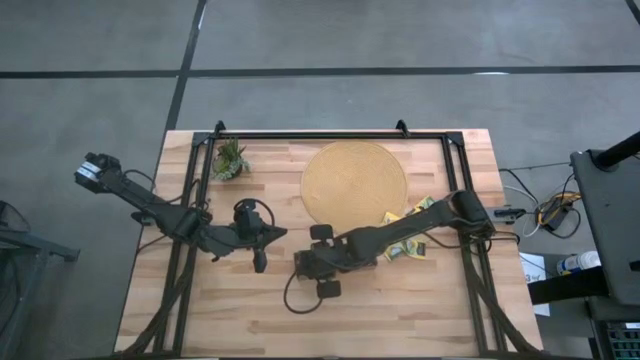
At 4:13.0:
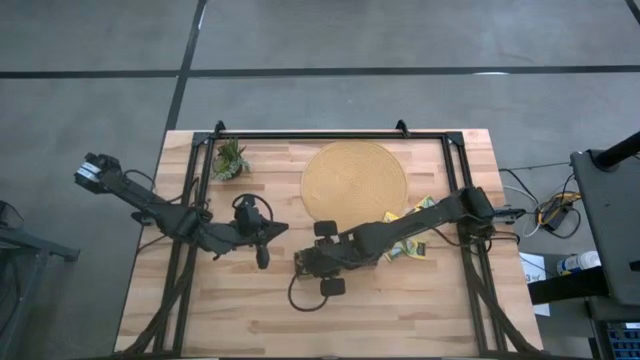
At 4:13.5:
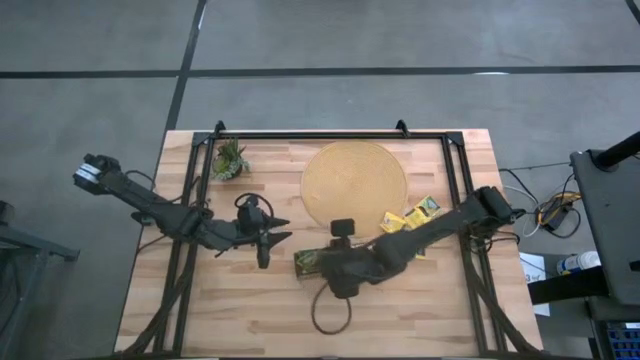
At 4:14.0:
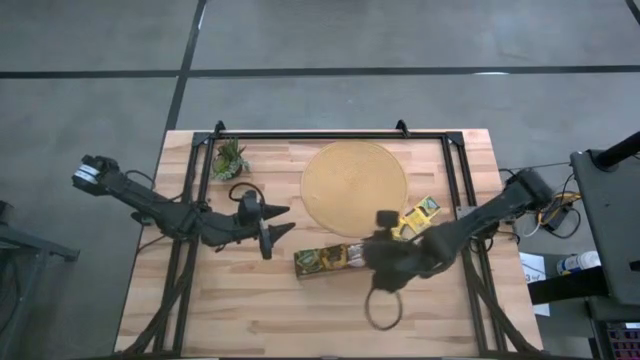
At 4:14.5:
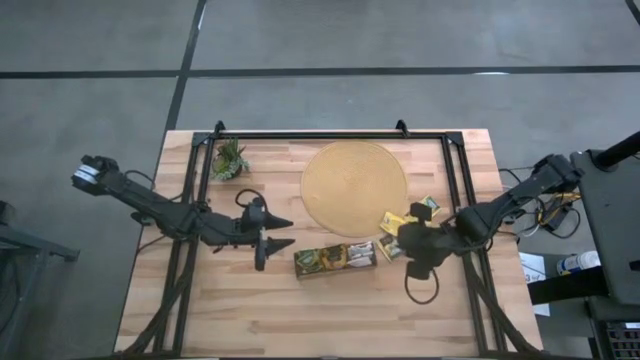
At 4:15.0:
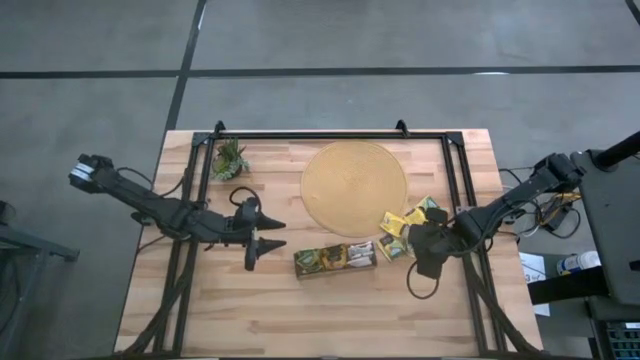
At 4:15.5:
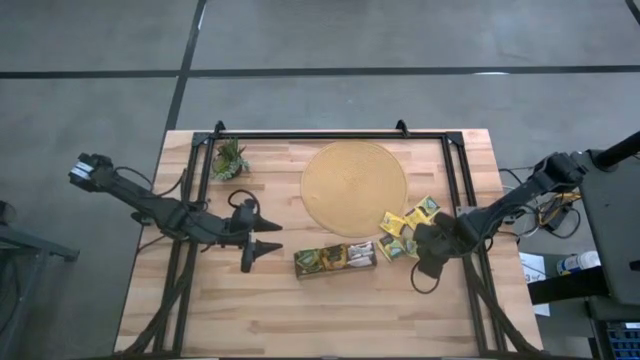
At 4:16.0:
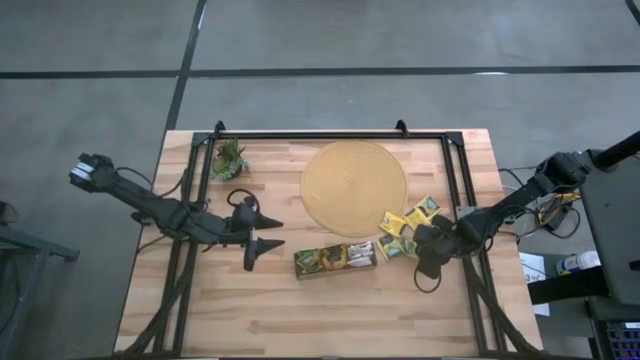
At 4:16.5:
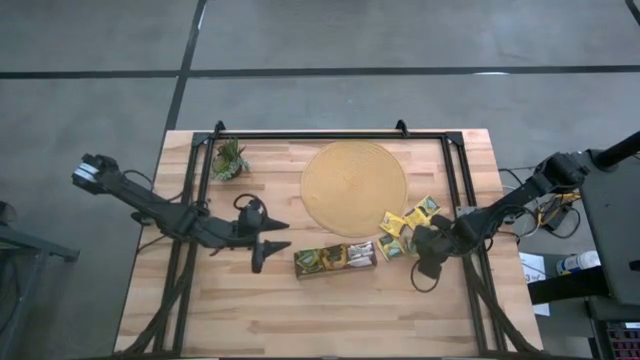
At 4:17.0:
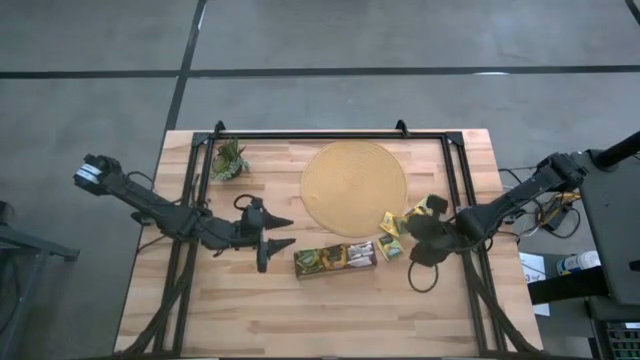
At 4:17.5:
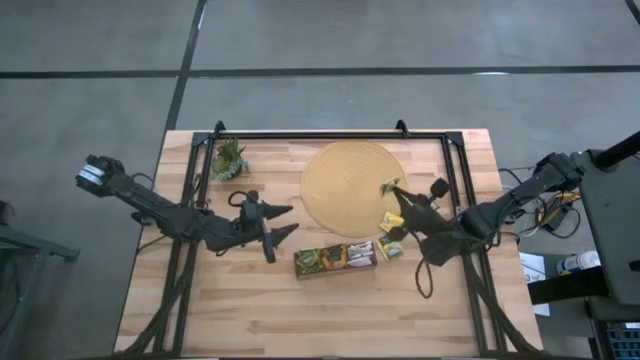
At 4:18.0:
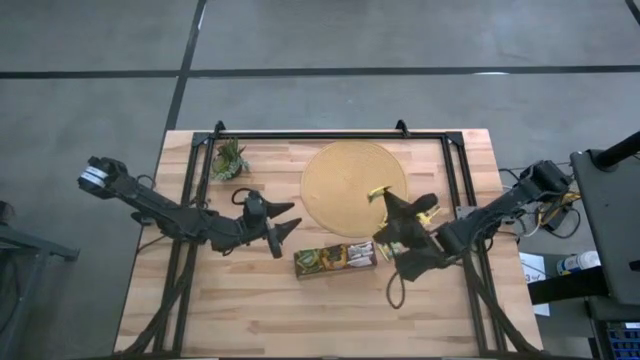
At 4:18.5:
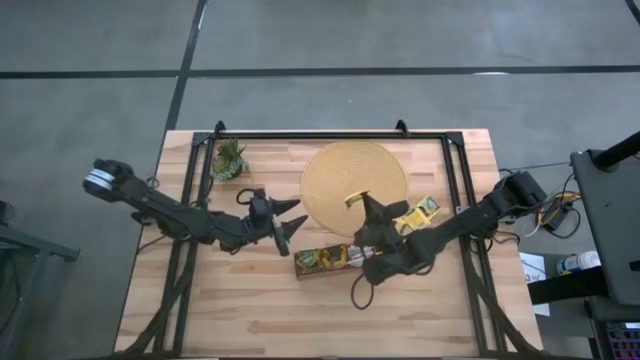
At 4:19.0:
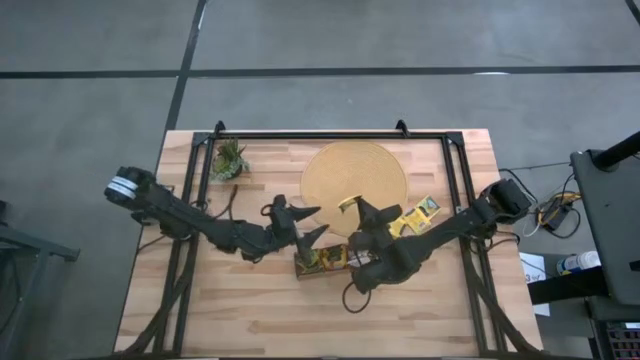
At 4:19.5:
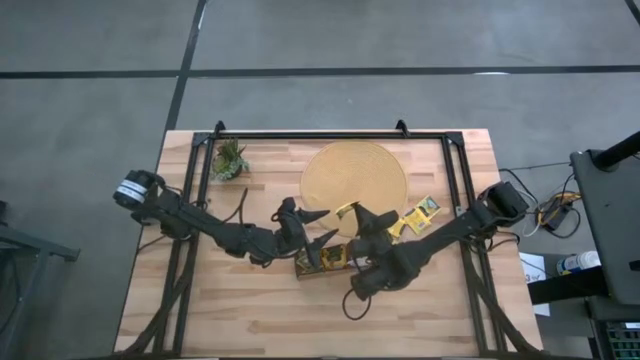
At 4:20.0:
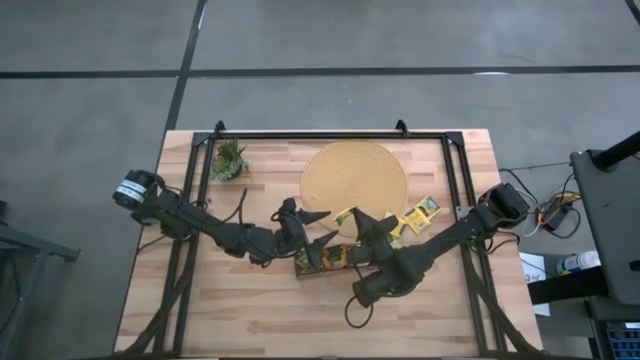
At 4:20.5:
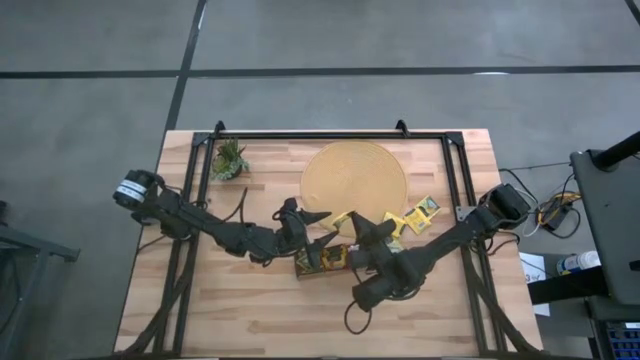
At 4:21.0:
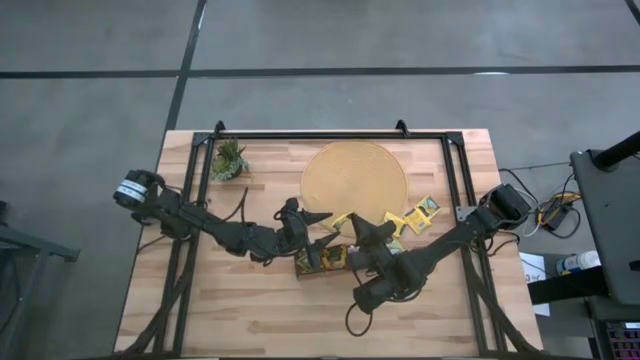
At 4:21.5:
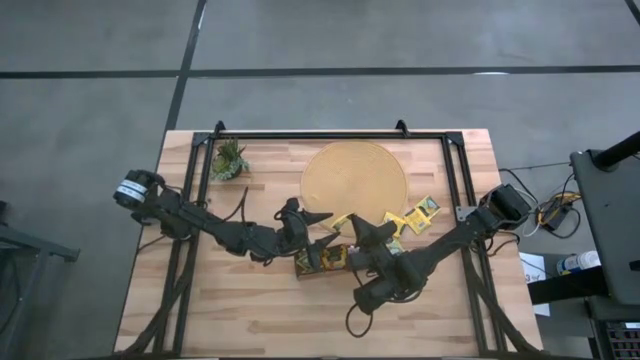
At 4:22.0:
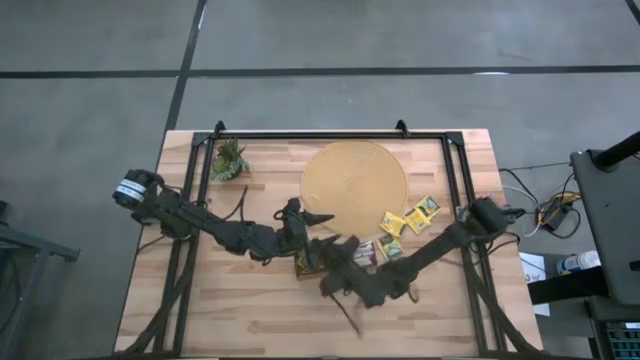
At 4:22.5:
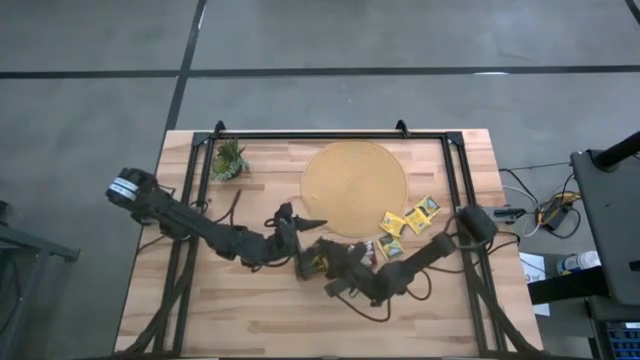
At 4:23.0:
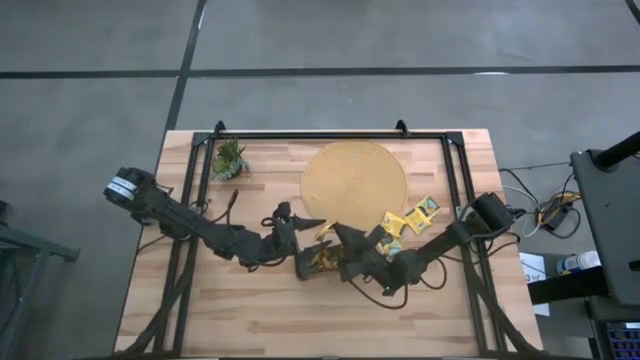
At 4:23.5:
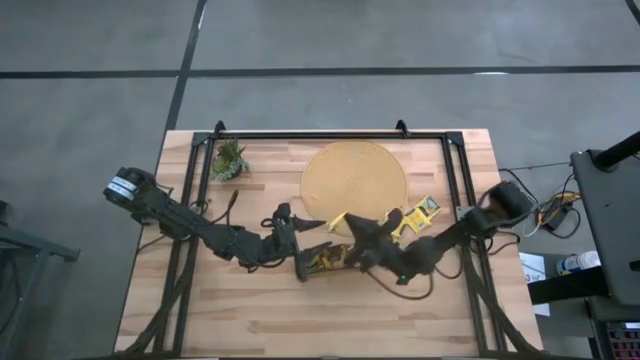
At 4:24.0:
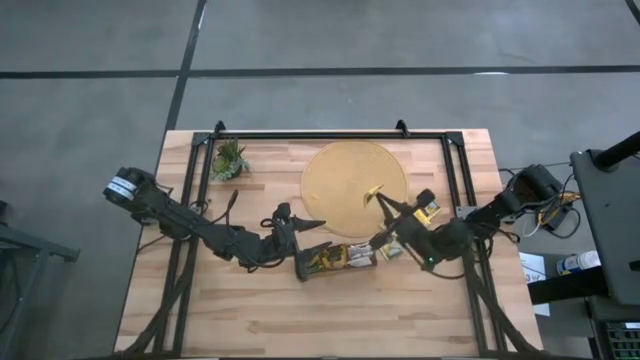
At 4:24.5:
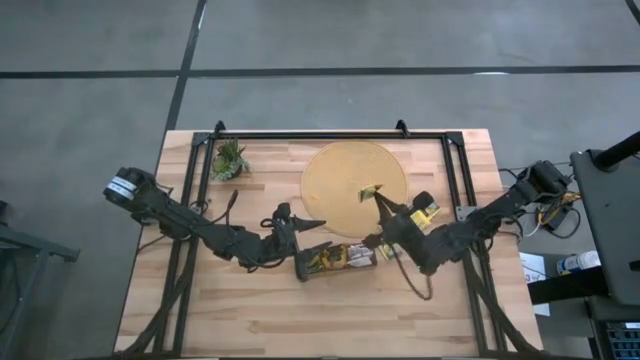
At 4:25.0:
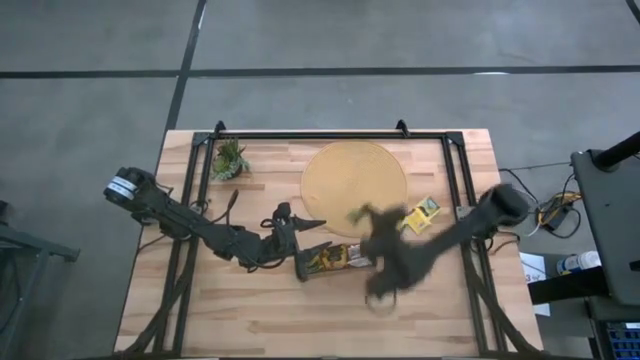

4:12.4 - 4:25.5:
Task: Pick & Place Tea
Put the yellow tea bag into the left section of the wooden organizer
